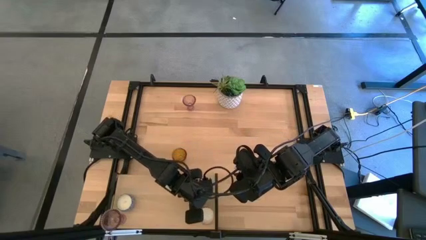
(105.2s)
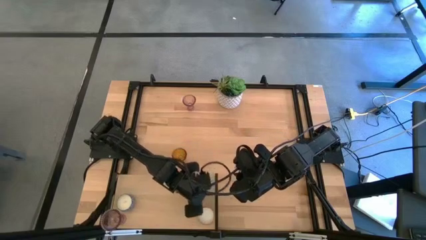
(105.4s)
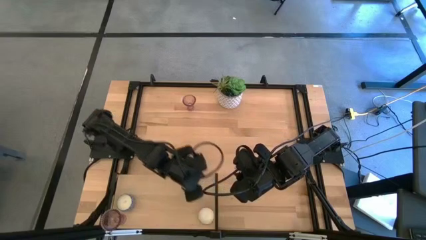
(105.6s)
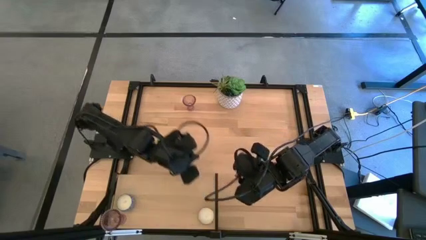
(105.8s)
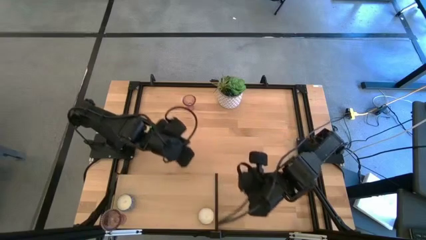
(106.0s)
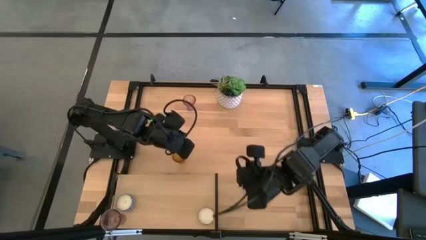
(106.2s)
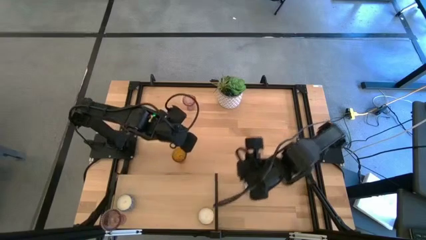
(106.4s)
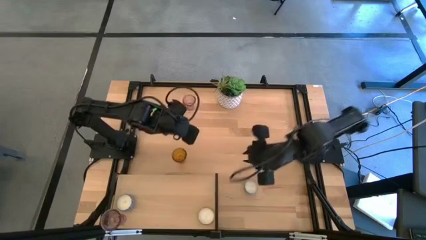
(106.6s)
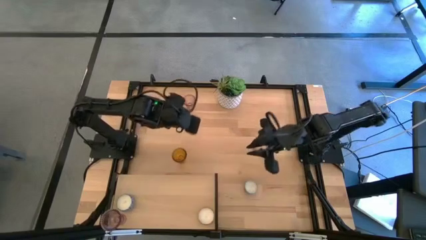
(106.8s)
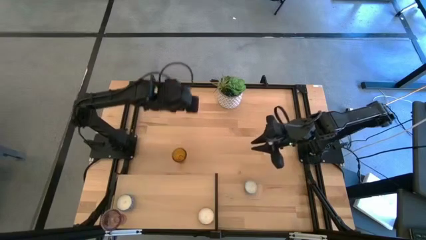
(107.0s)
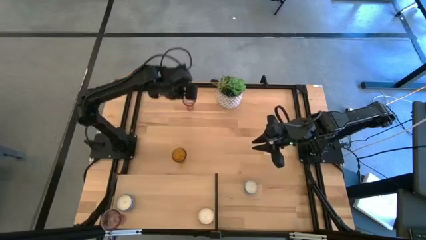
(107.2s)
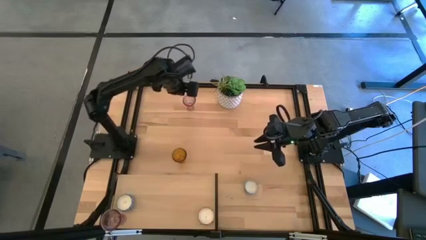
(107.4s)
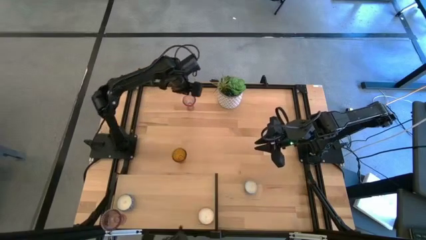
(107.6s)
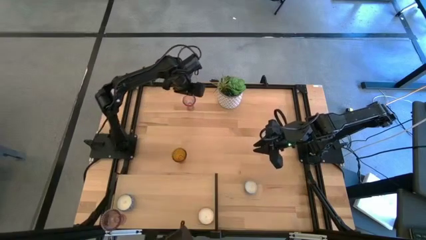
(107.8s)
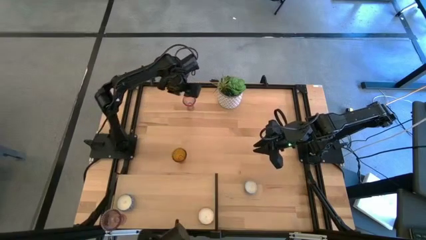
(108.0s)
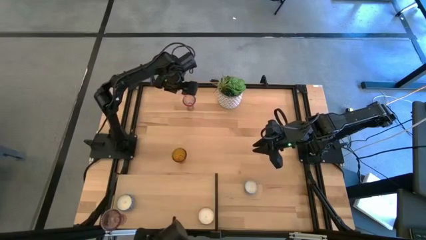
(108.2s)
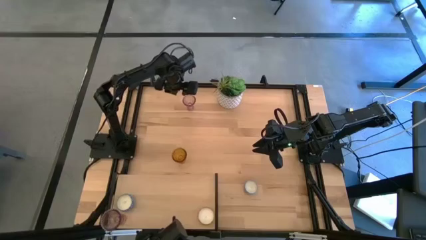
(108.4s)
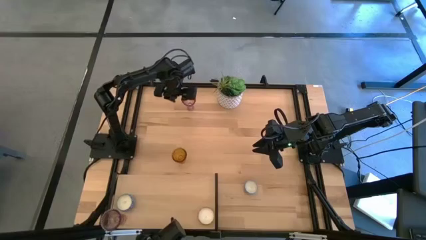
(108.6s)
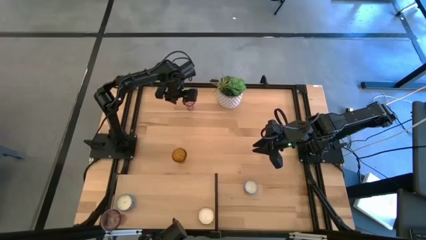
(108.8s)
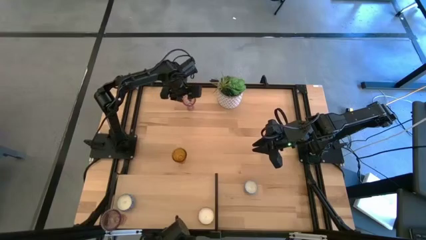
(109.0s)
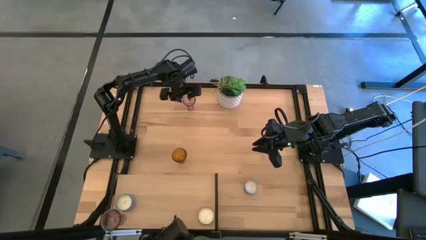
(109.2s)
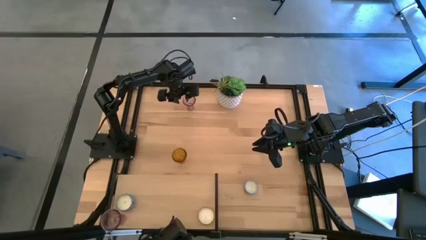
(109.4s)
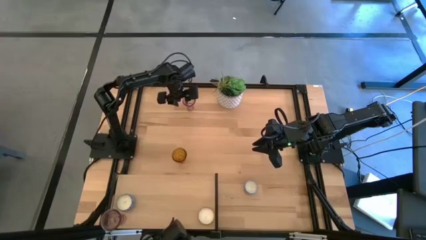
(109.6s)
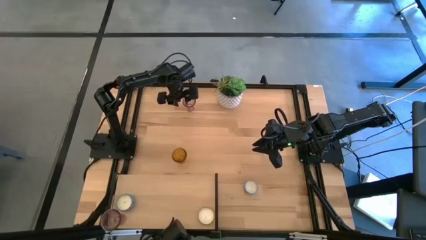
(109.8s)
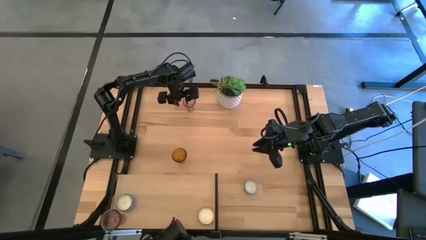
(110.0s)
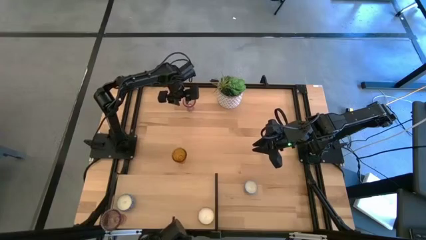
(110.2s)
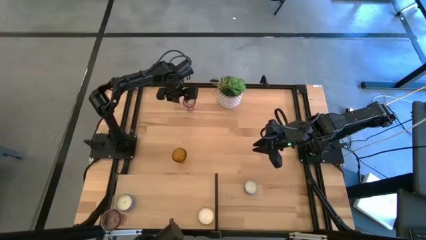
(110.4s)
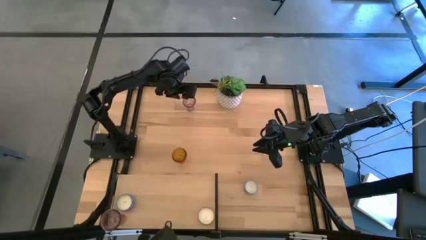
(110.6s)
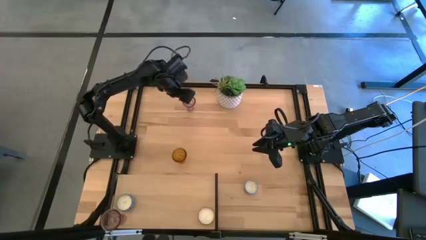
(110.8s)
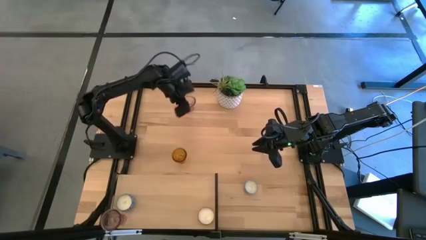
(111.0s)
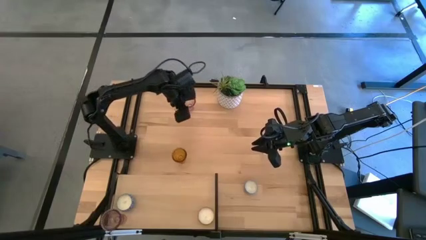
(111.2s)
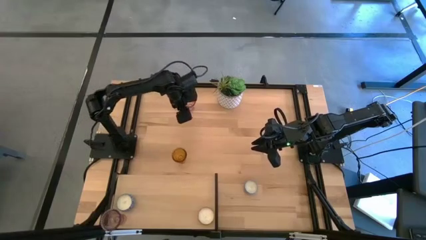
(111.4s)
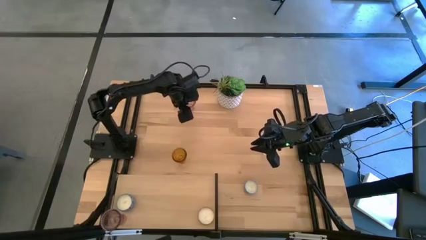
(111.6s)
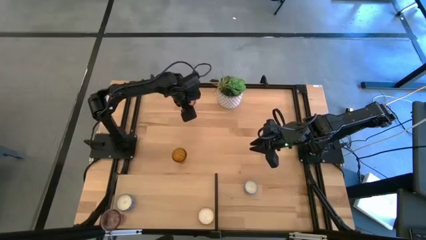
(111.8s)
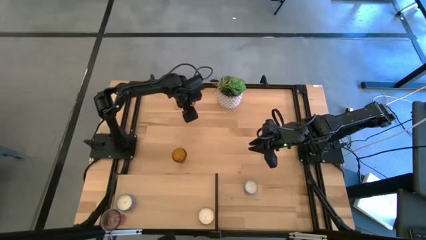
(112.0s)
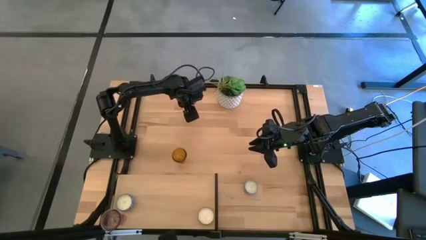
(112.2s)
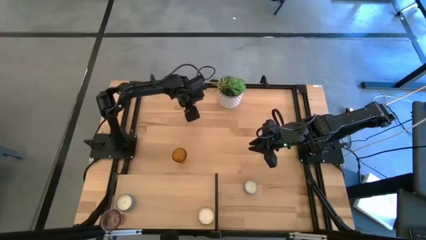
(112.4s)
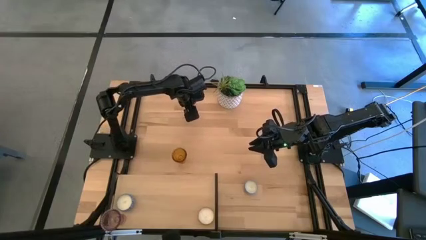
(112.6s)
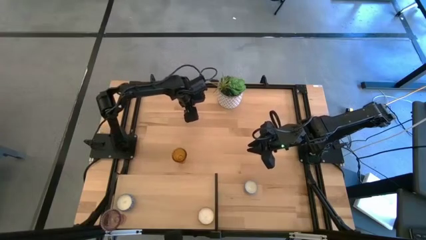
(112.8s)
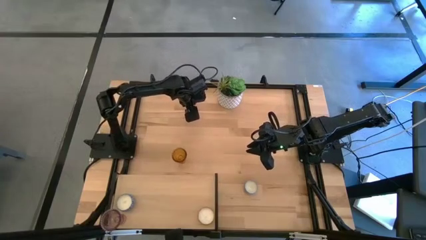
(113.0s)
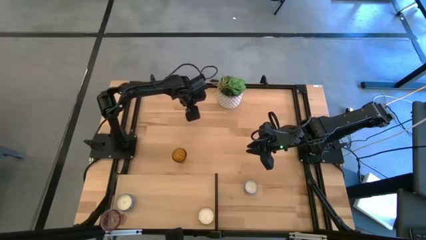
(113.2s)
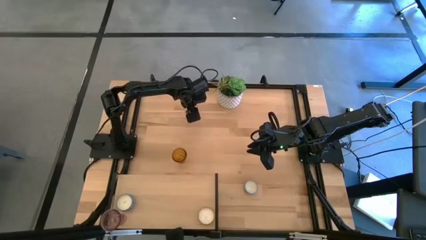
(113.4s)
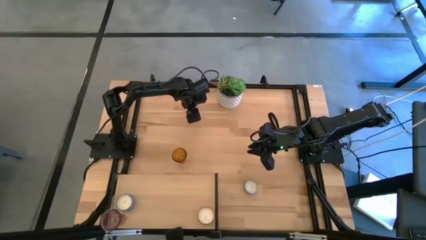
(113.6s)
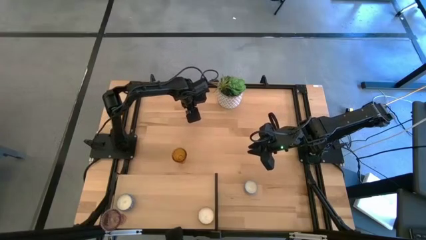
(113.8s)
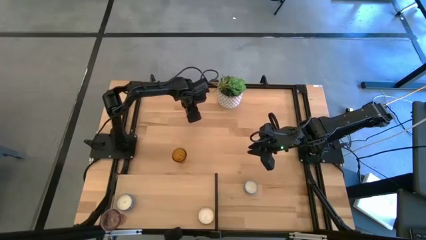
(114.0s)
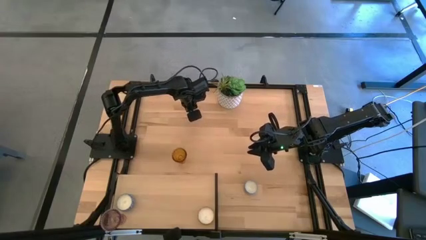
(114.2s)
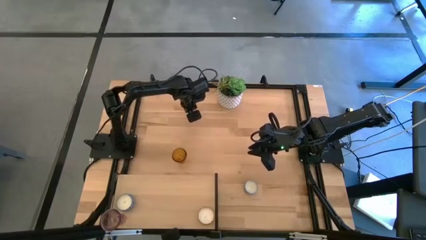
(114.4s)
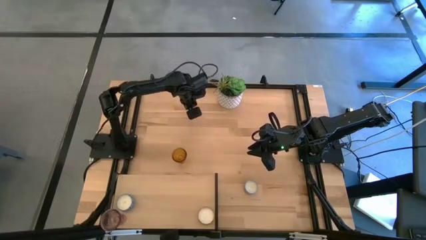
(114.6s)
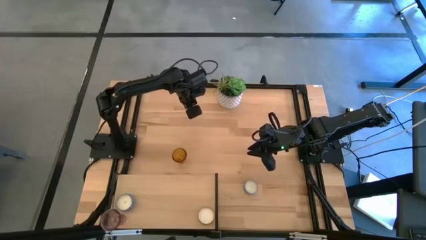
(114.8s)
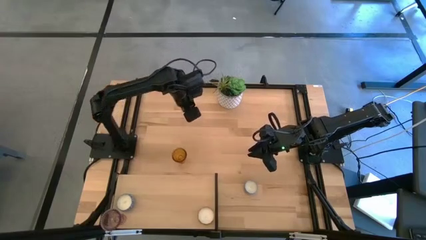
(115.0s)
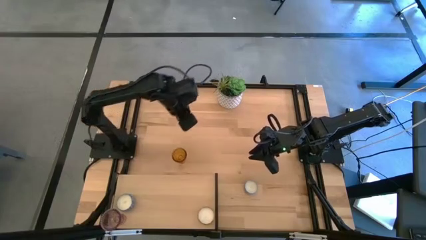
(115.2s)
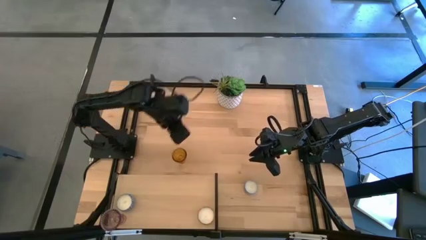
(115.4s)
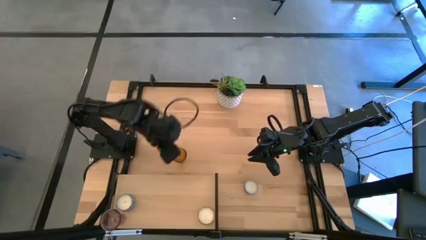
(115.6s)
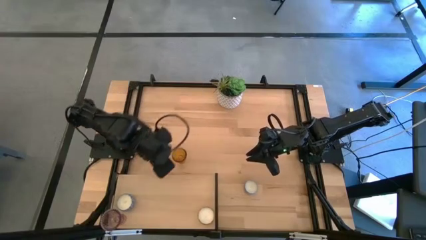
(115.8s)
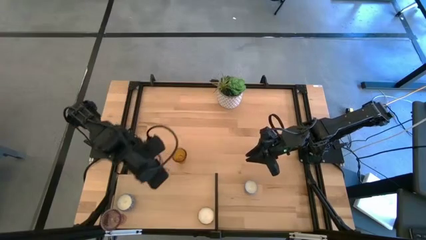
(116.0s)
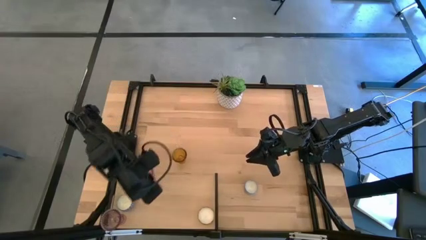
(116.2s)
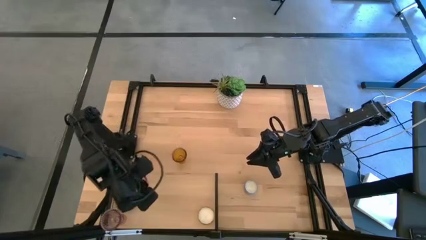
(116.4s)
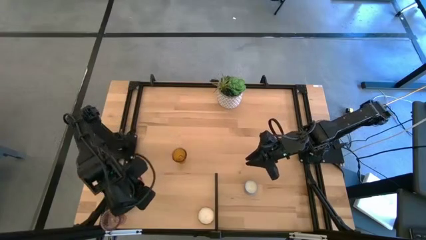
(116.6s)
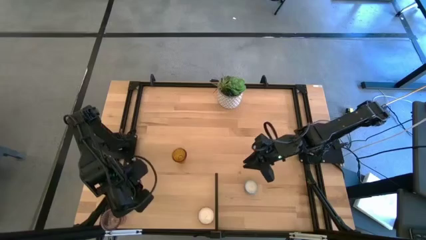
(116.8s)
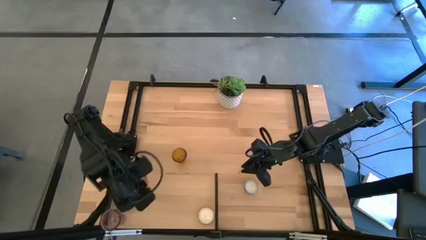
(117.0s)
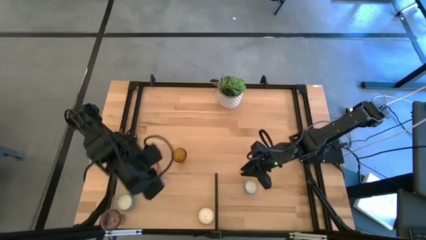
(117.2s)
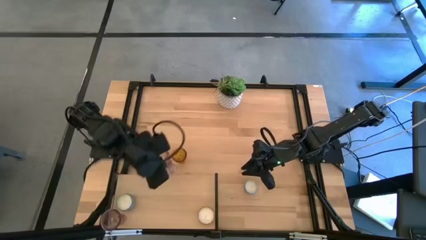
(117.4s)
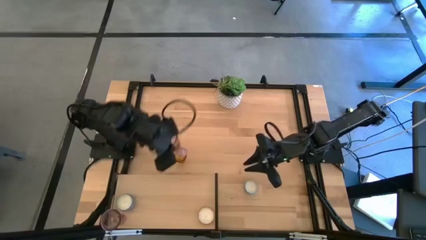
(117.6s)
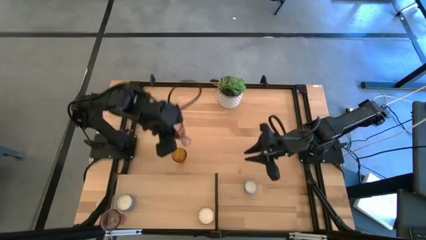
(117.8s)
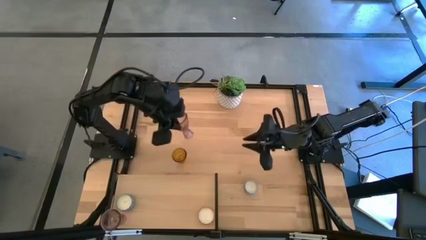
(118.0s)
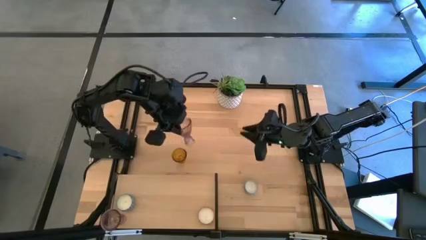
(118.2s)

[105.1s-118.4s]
Task: Pick & Place candle stick holders
Put the pink glass on the shelf

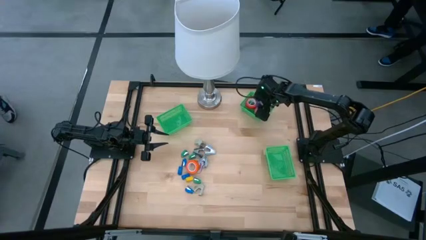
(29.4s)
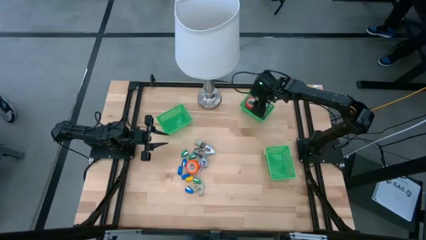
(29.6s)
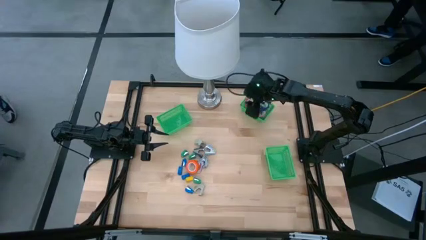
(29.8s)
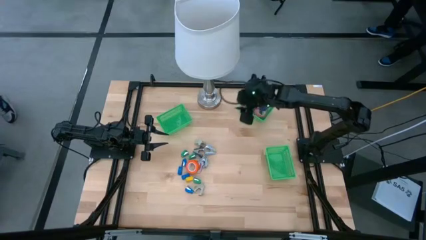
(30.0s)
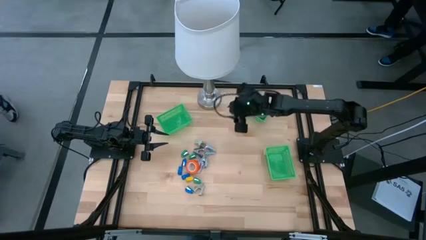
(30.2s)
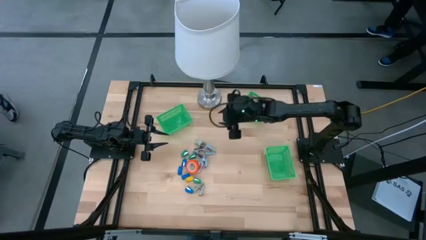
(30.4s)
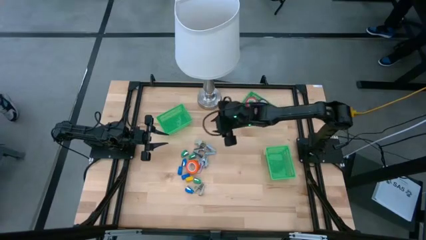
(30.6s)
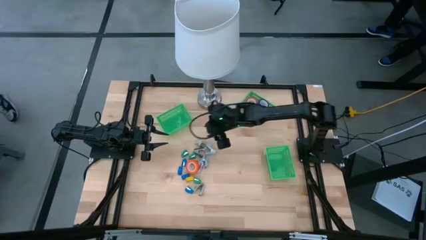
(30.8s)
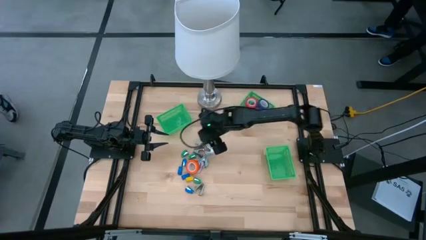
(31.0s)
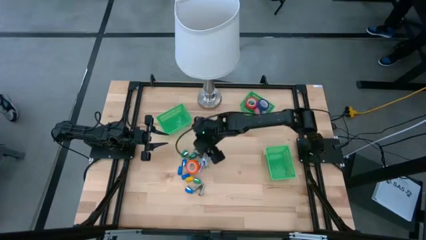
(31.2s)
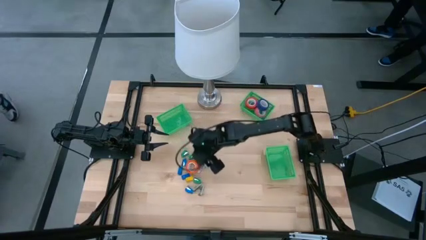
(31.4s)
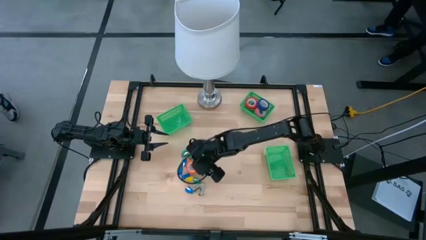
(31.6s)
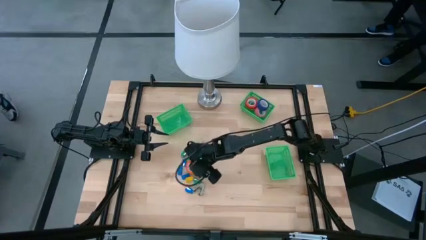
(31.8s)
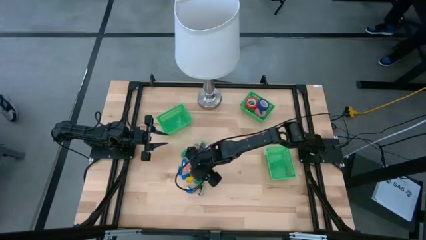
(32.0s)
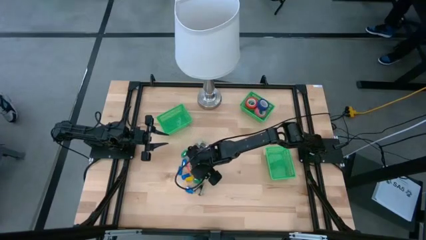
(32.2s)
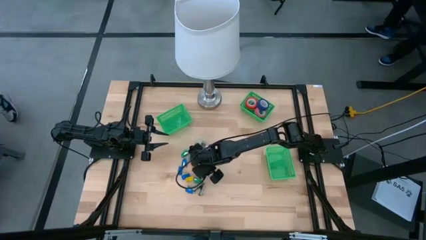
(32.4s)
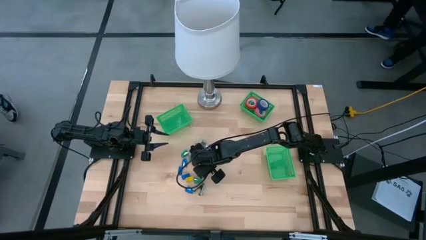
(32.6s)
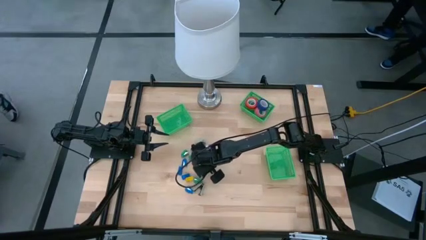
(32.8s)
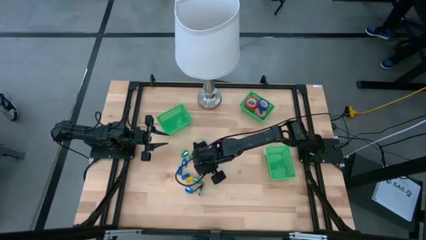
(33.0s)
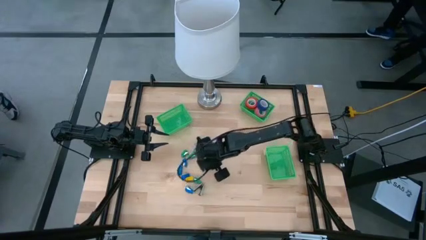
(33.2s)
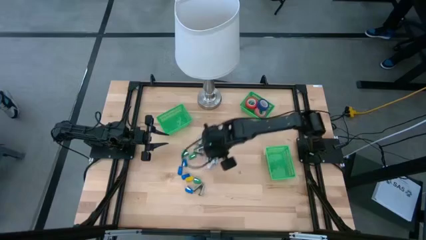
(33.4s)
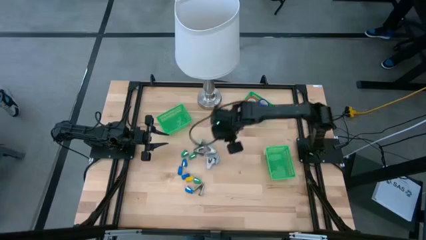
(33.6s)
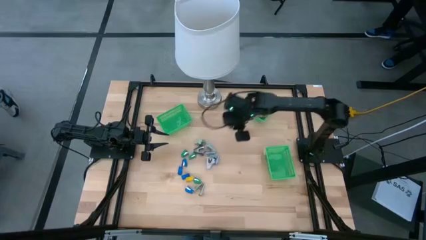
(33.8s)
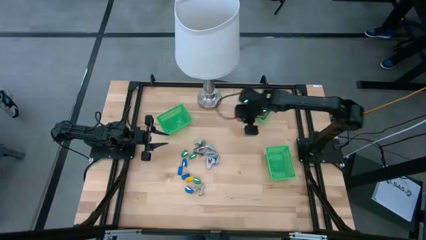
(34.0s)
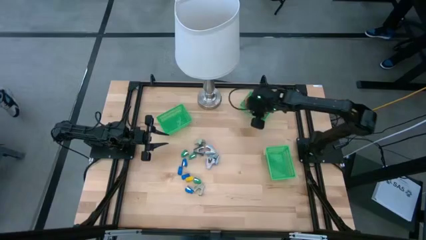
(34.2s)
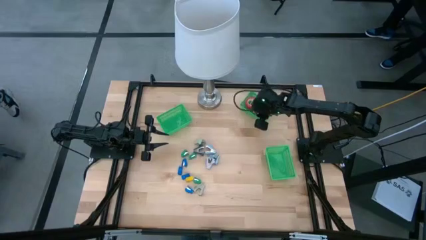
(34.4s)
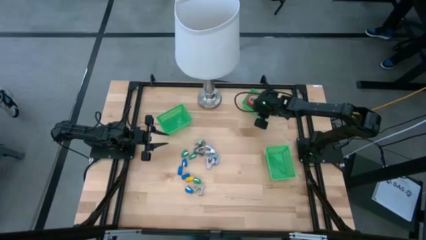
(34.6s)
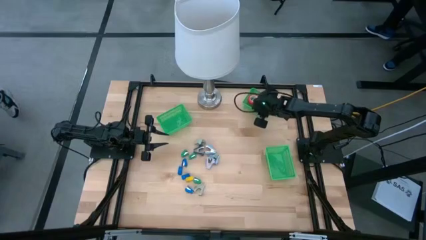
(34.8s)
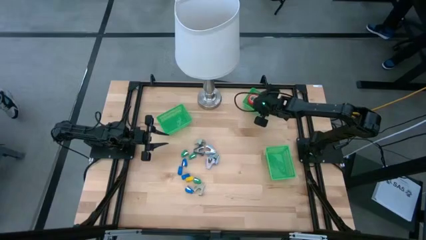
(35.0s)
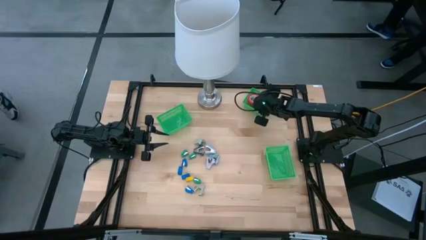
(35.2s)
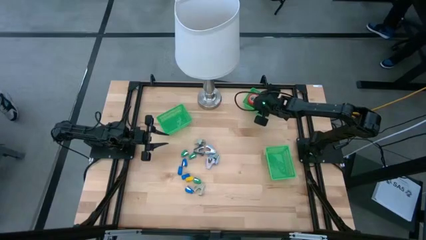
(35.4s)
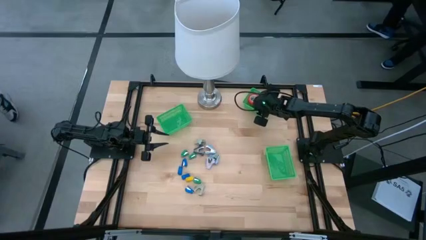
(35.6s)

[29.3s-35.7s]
Task: Pick and place Stapler, Stapler remover, tape
Put the orange tape into the top right green bin
